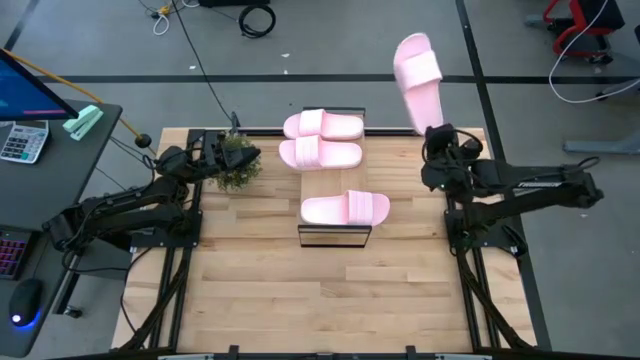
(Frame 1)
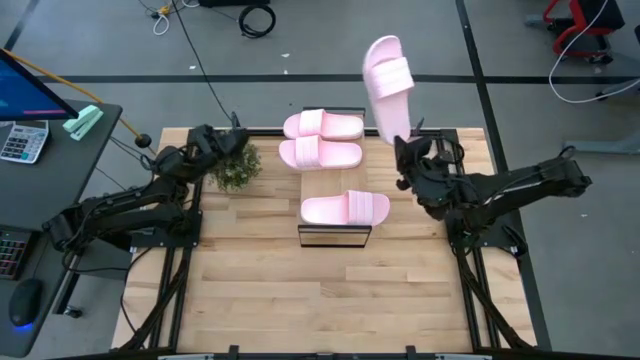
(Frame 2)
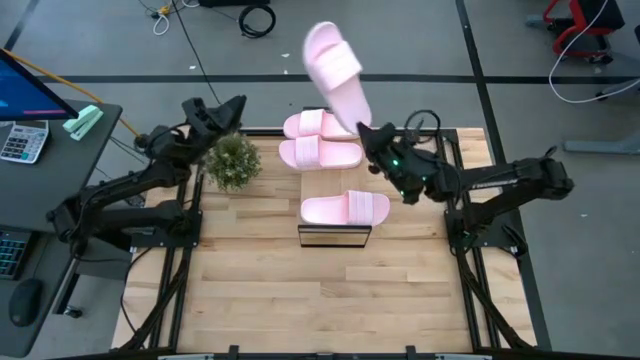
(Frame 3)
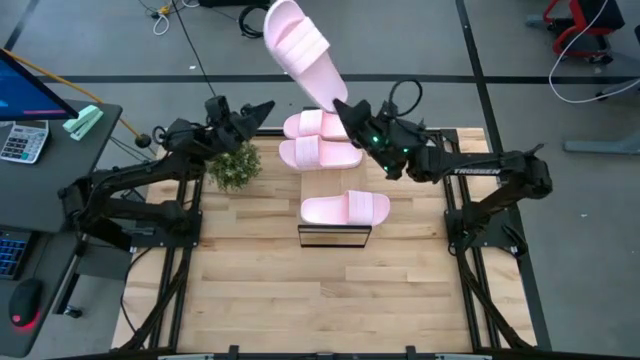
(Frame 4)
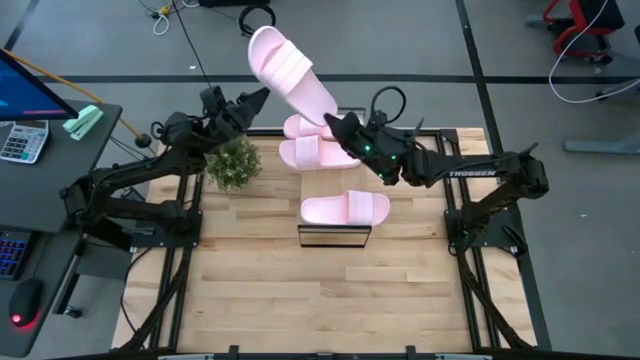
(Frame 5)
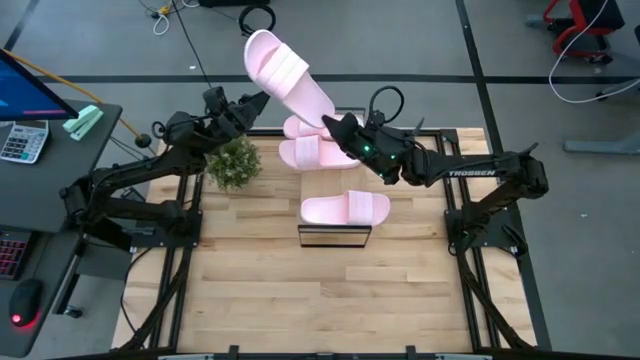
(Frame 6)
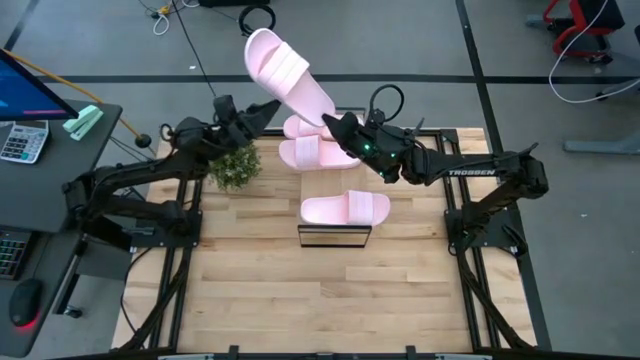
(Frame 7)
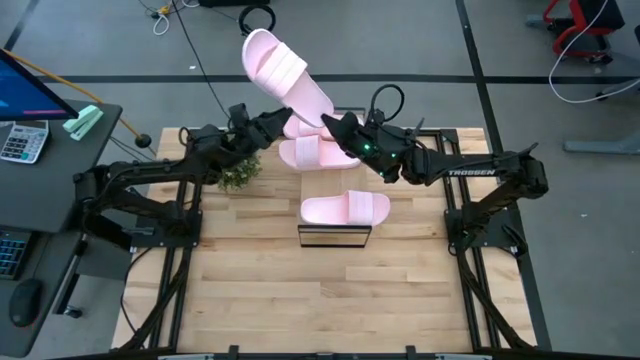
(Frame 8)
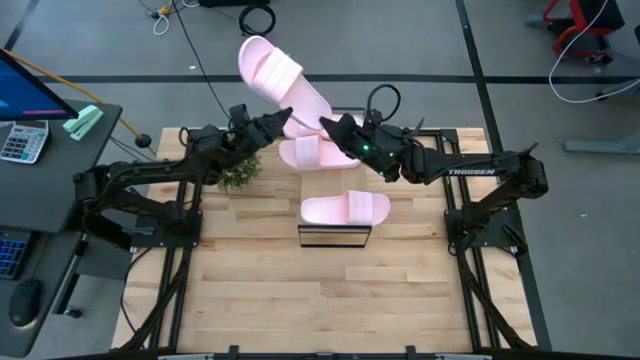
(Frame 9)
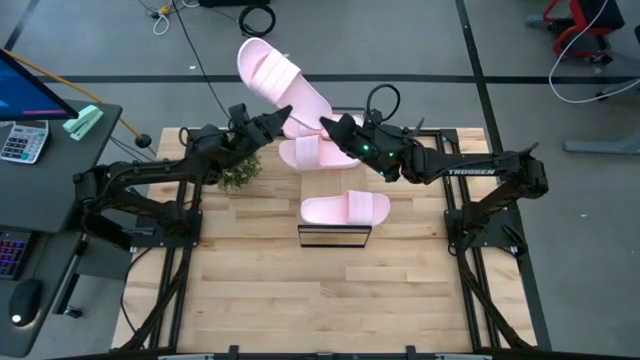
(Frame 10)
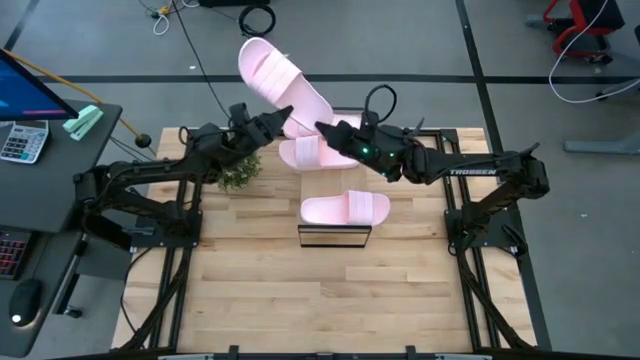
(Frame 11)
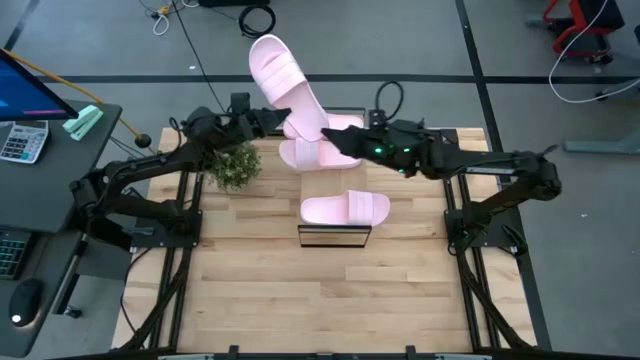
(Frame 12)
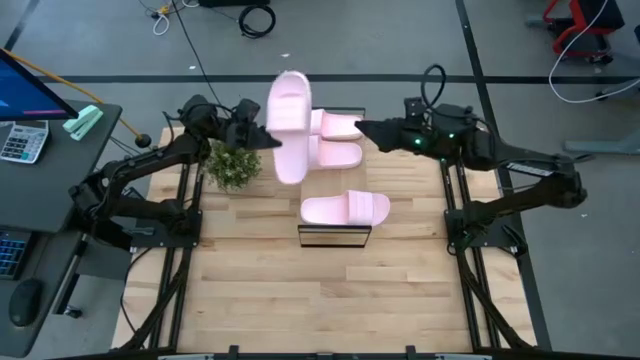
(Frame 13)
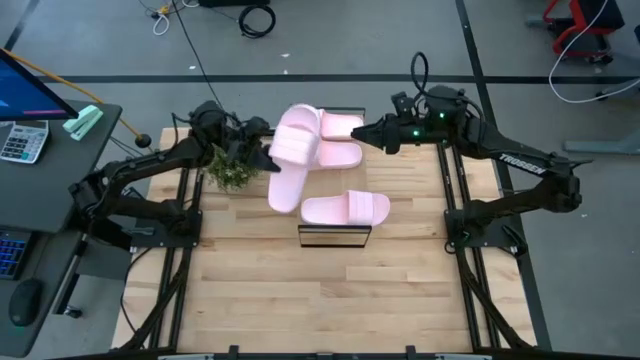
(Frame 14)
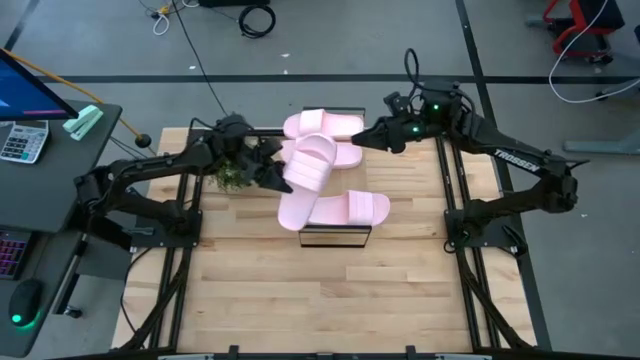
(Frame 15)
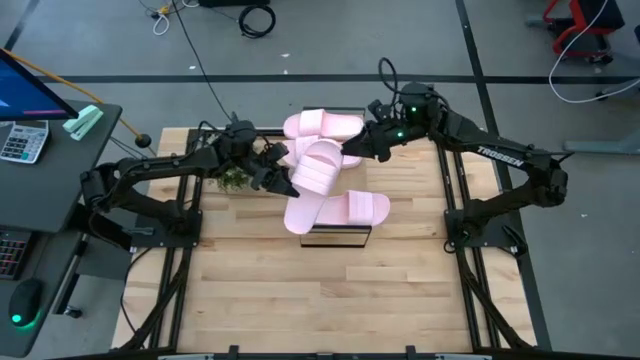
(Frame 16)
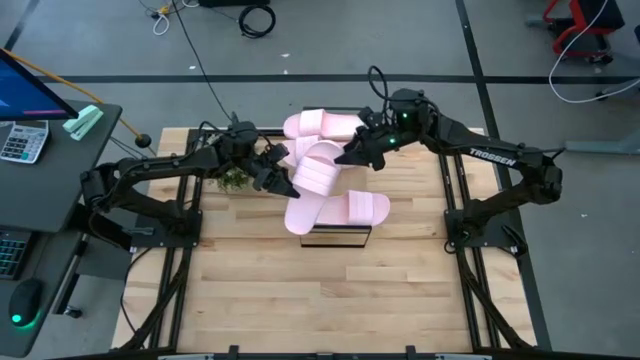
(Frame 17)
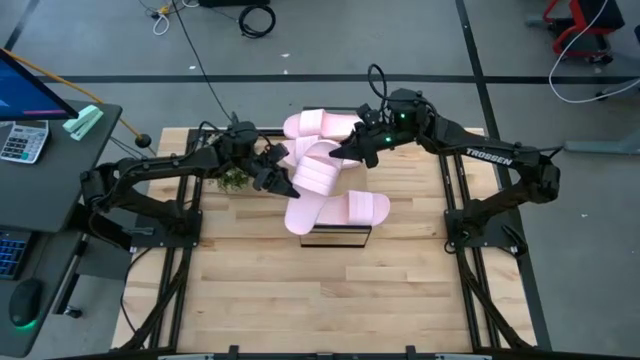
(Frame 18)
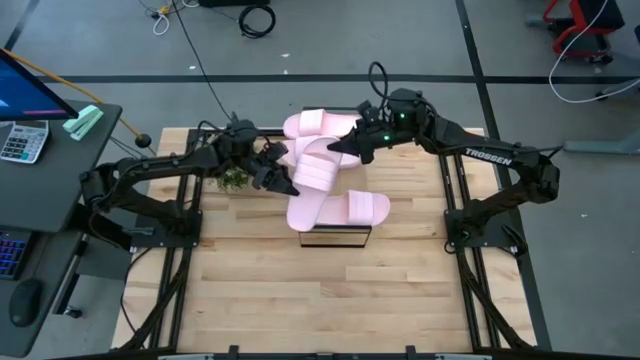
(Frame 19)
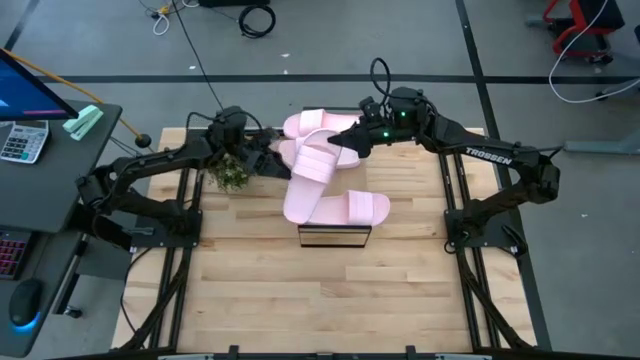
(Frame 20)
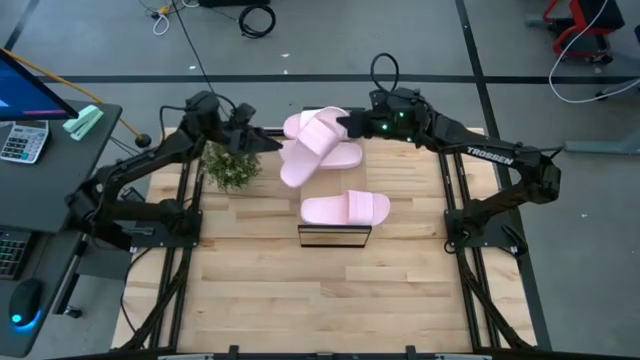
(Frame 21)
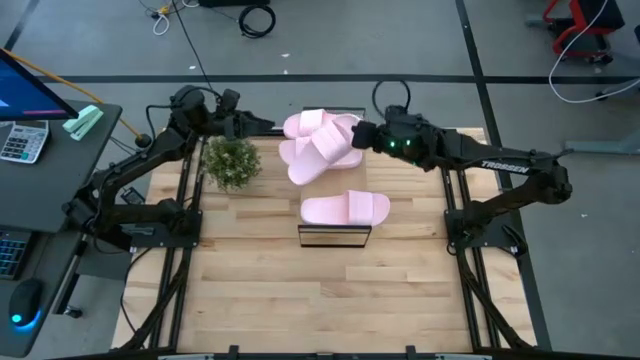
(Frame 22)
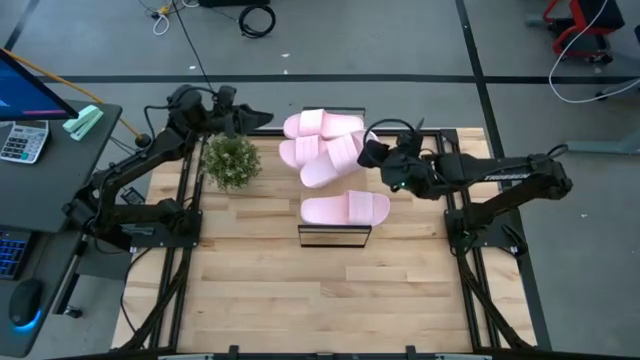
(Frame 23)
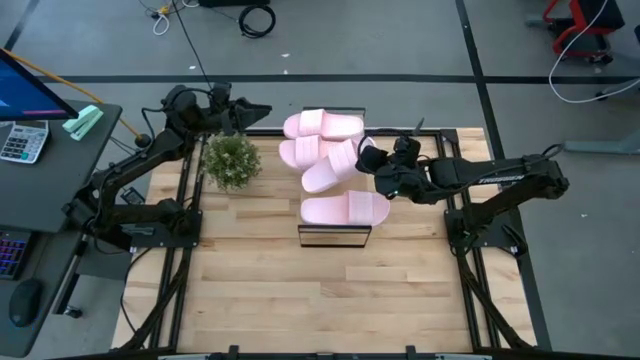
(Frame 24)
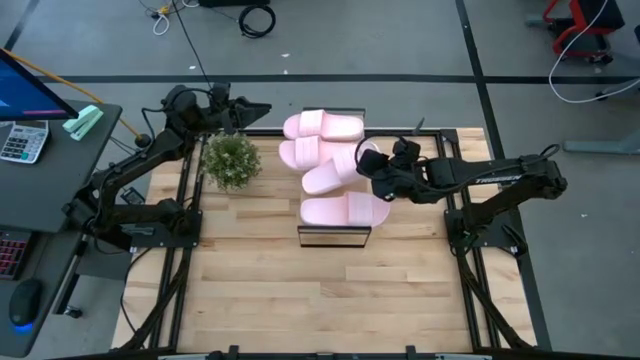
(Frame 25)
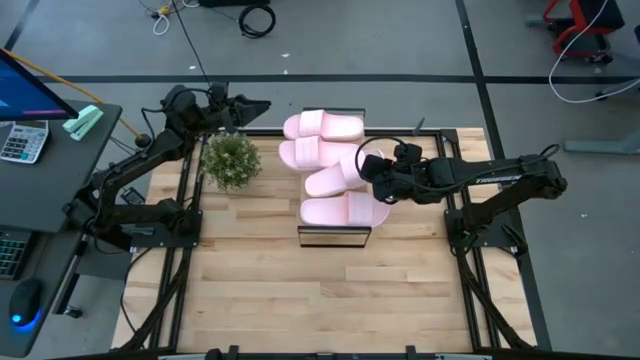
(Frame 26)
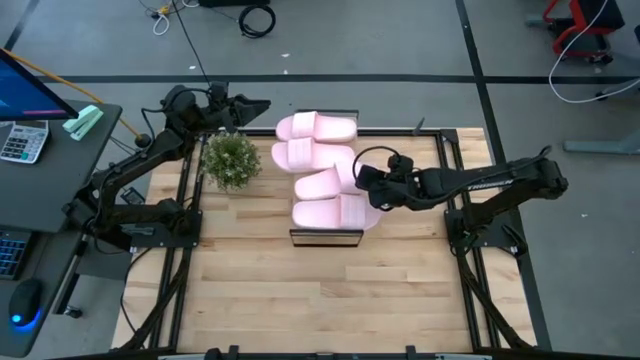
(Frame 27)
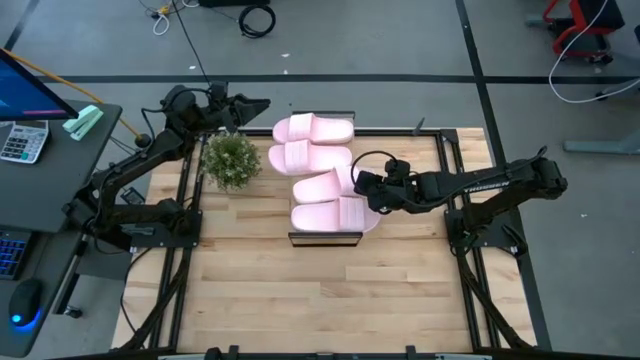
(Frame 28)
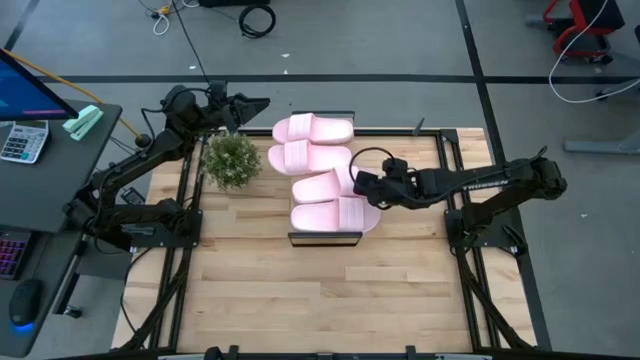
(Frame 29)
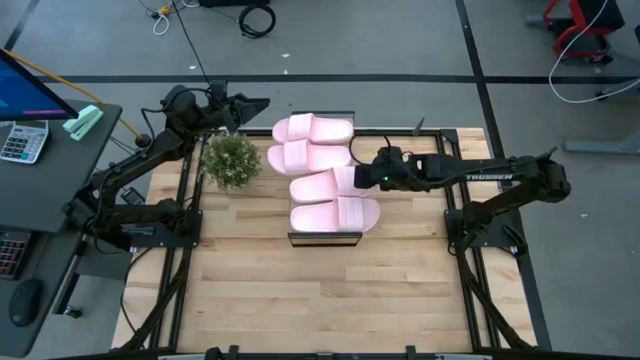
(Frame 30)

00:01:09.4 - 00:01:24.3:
Task: Pick and place slides into the shelf
Put the pink slide on the shelf

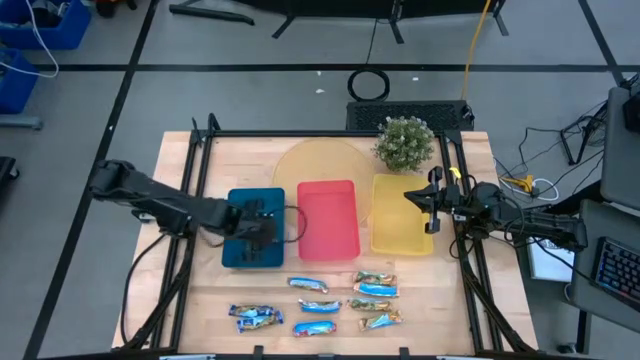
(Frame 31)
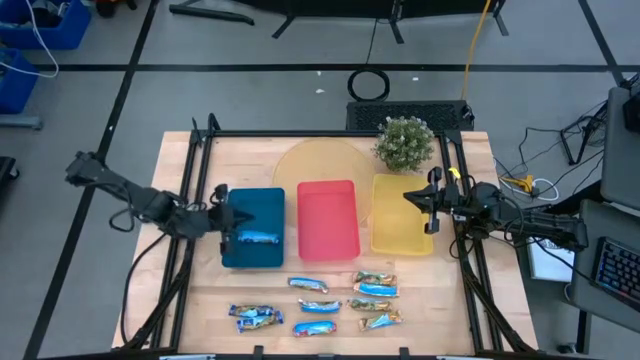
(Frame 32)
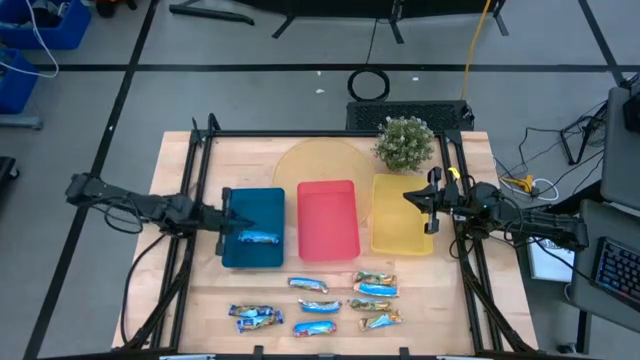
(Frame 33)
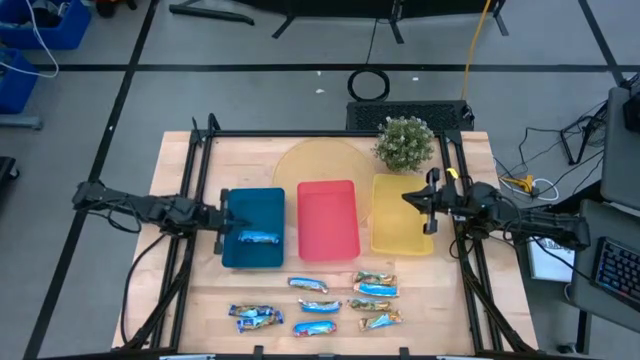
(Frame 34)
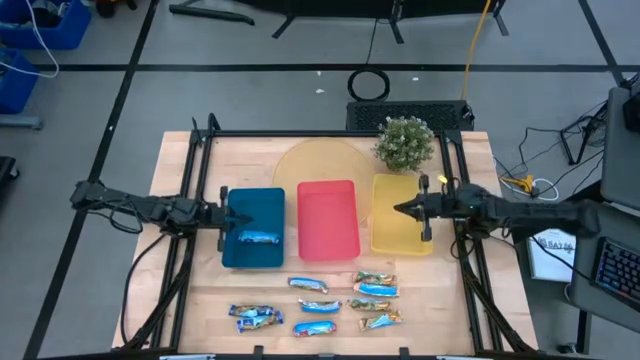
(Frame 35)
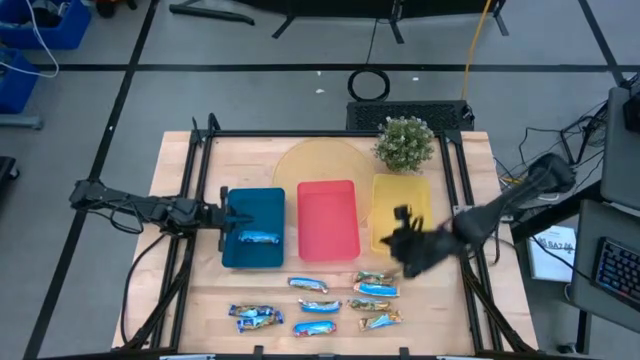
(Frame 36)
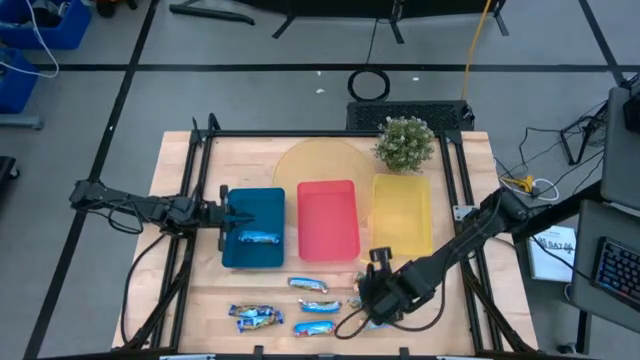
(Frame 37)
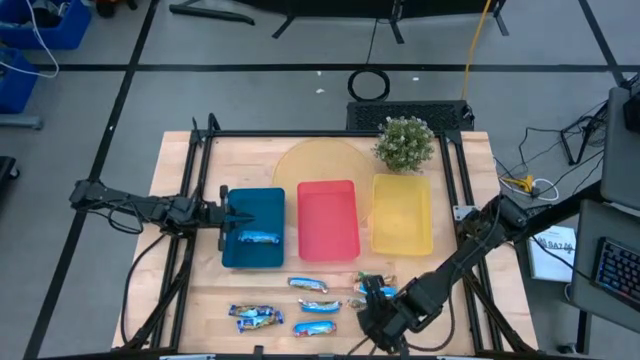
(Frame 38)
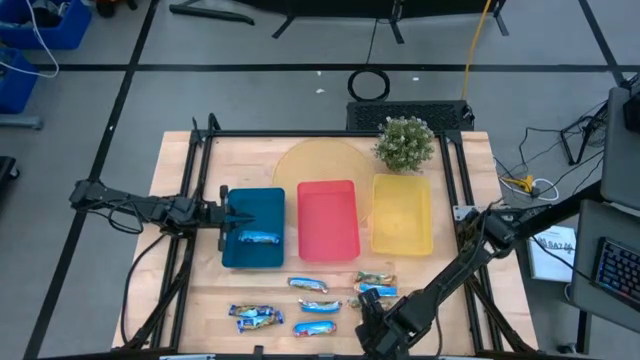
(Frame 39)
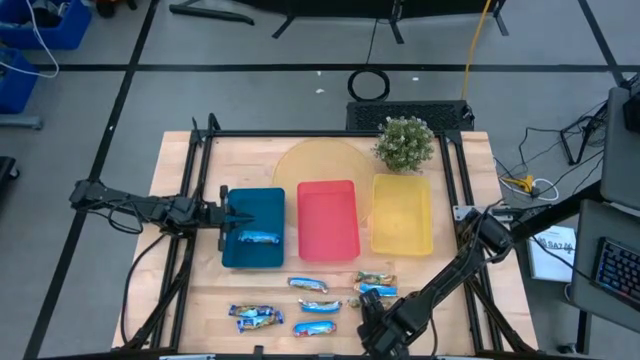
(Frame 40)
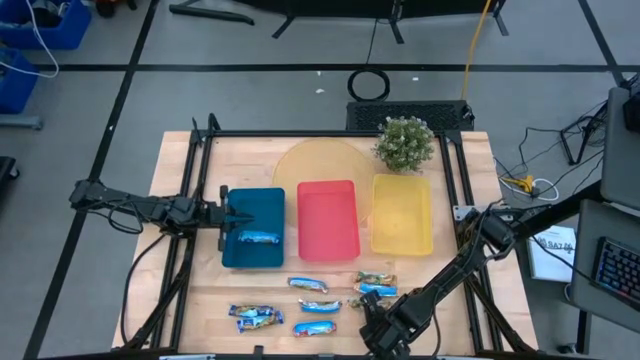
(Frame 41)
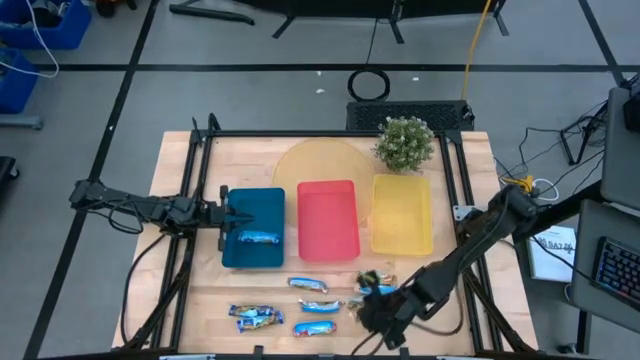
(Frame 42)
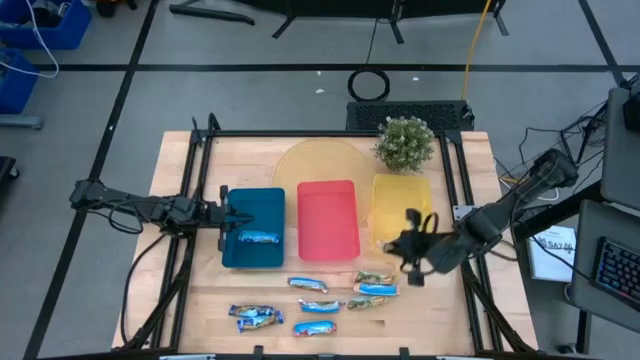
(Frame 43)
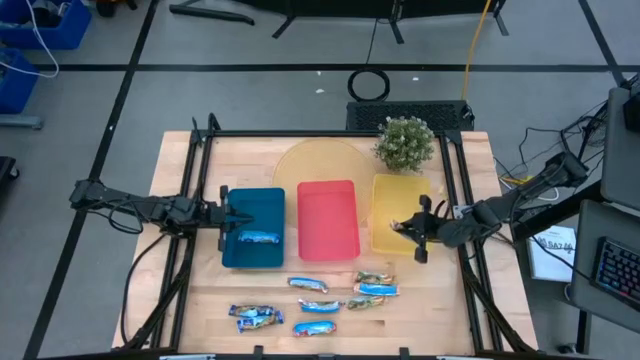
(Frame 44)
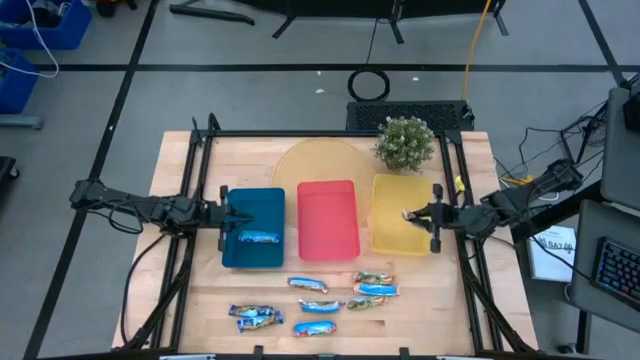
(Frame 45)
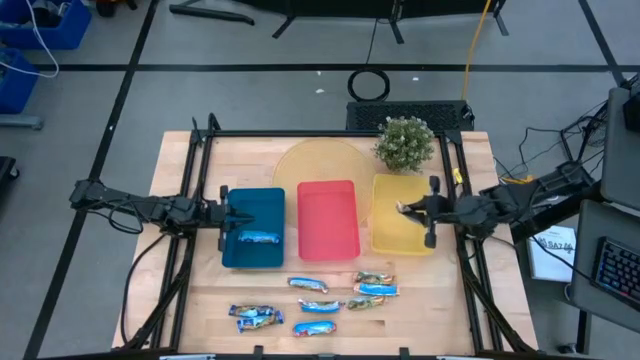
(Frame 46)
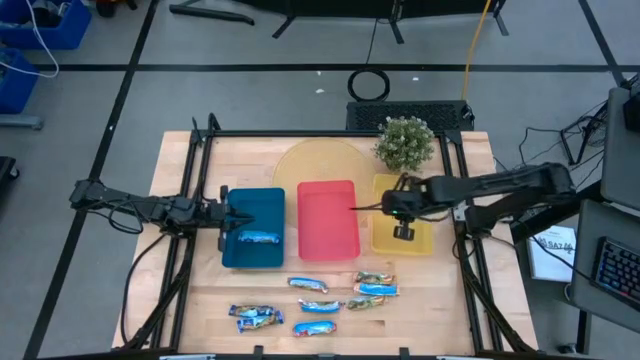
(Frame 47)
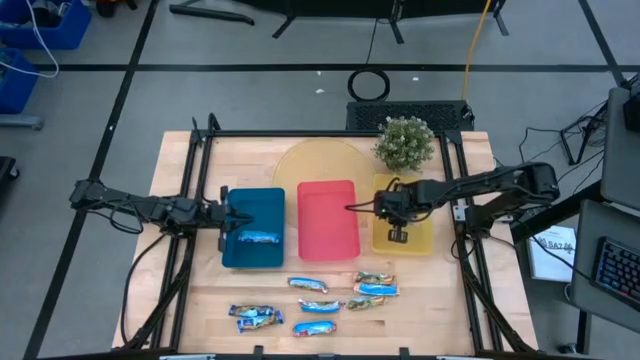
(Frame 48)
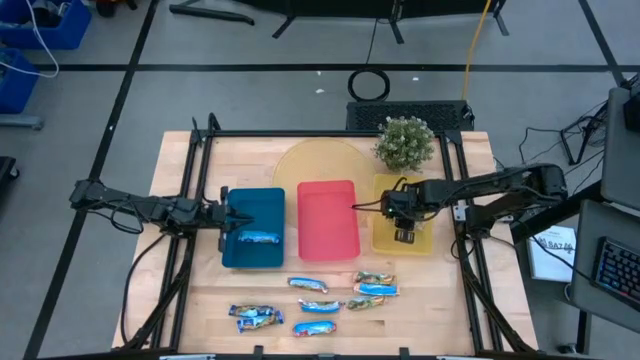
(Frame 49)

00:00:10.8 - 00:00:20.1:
Task: Pick and place Granola Bars by type
Put the yellow granola bar into the yellow bin
